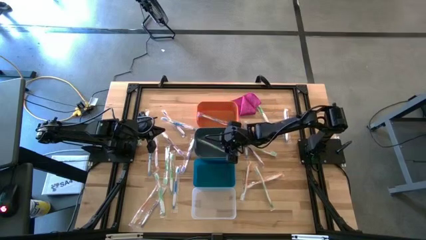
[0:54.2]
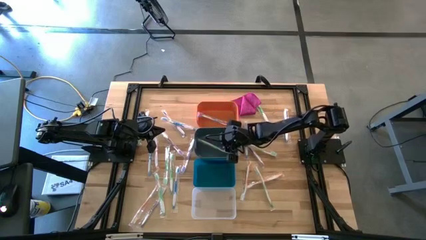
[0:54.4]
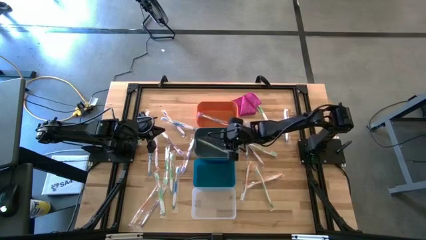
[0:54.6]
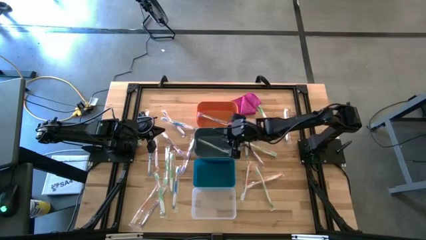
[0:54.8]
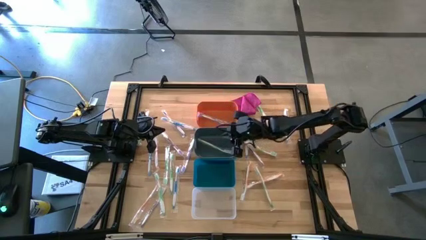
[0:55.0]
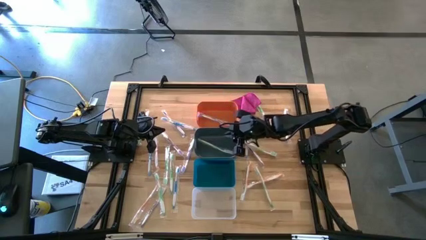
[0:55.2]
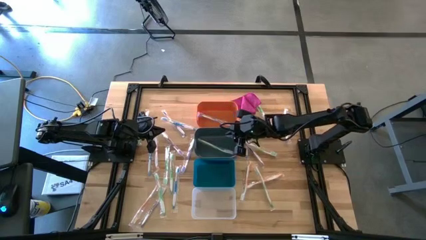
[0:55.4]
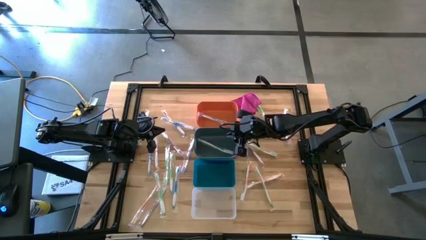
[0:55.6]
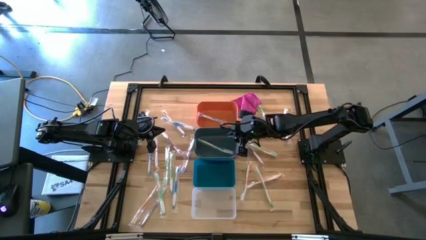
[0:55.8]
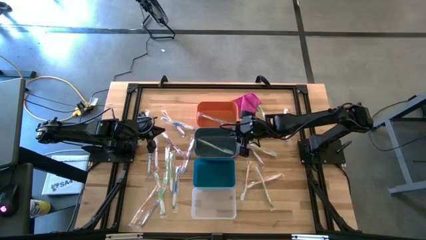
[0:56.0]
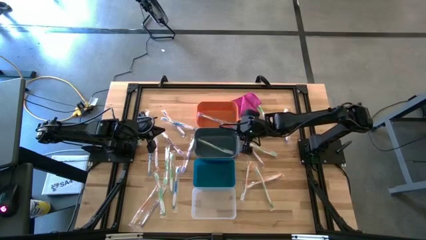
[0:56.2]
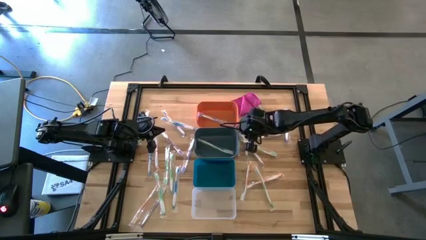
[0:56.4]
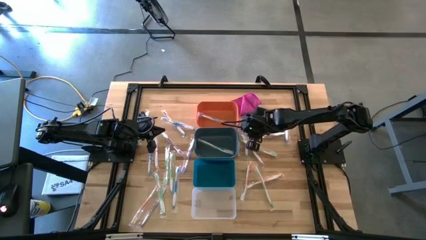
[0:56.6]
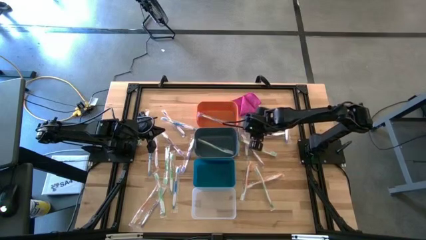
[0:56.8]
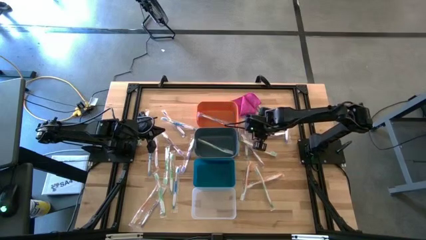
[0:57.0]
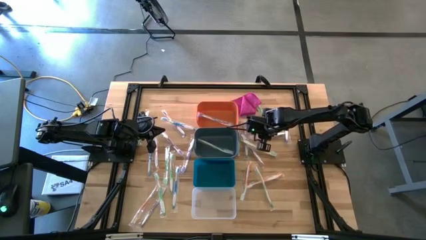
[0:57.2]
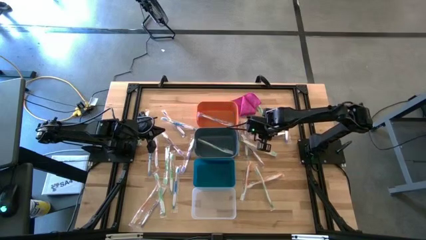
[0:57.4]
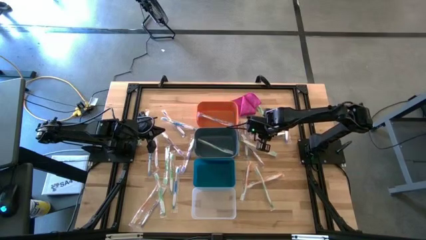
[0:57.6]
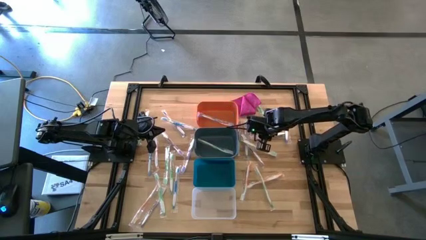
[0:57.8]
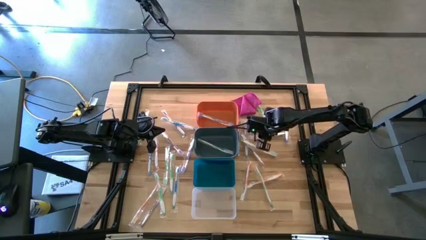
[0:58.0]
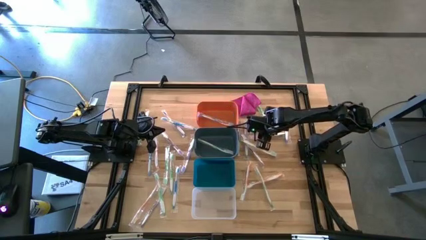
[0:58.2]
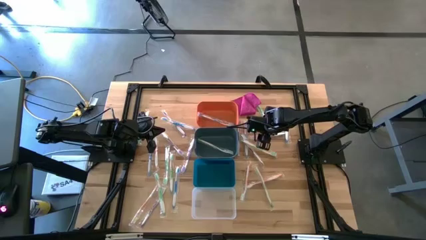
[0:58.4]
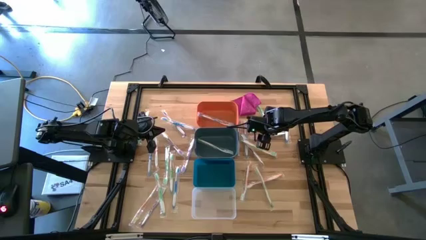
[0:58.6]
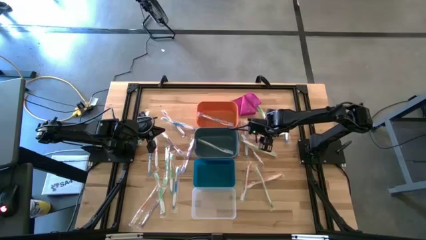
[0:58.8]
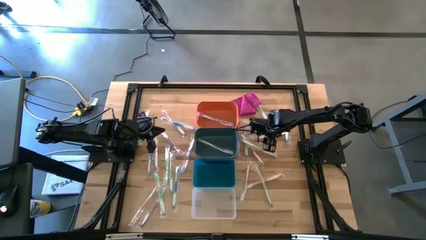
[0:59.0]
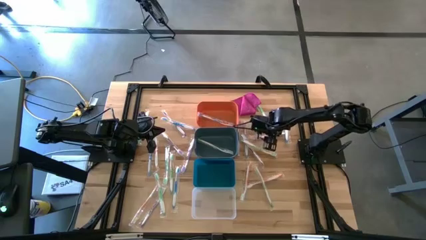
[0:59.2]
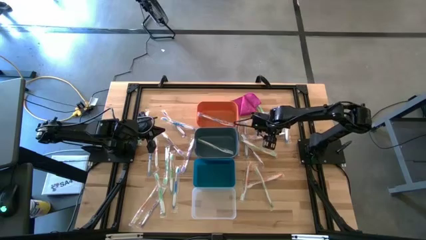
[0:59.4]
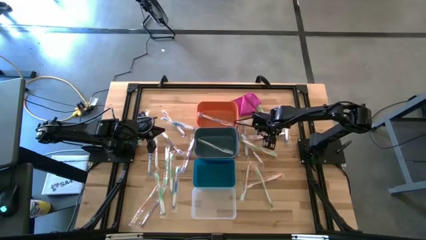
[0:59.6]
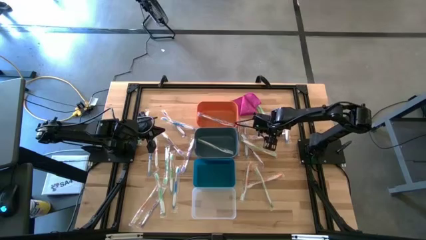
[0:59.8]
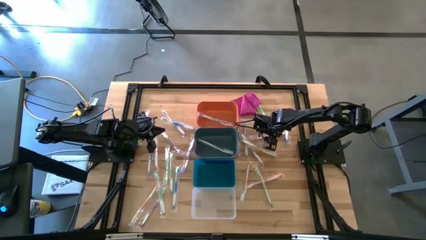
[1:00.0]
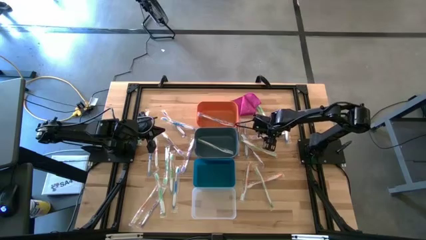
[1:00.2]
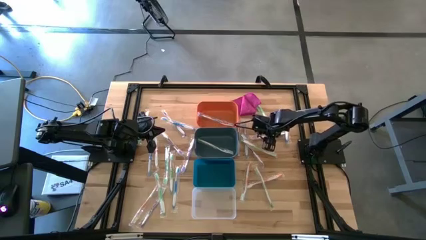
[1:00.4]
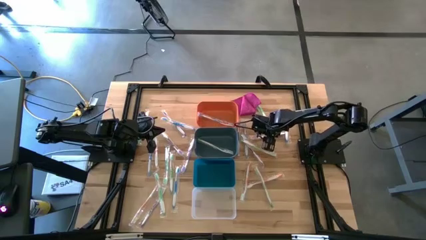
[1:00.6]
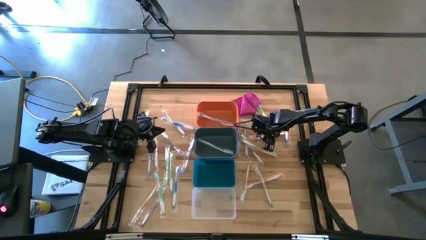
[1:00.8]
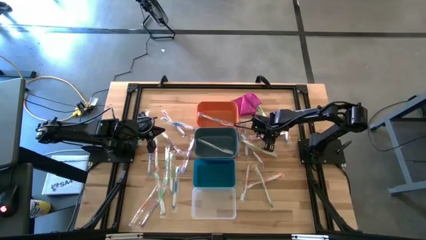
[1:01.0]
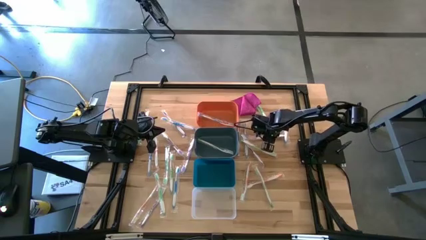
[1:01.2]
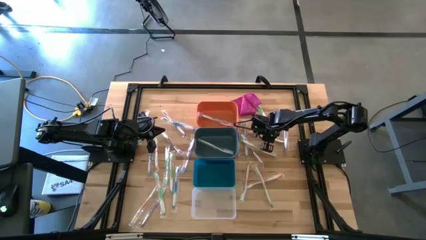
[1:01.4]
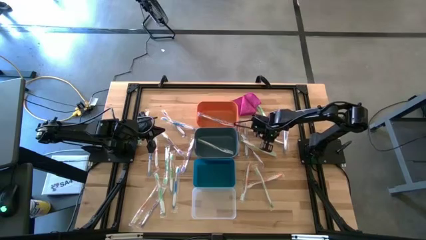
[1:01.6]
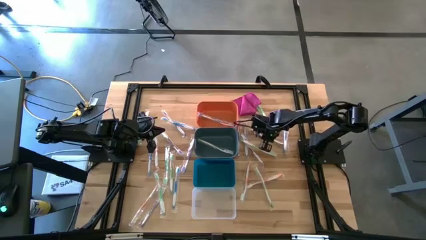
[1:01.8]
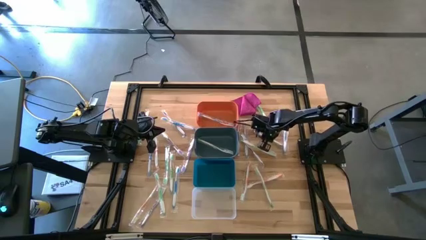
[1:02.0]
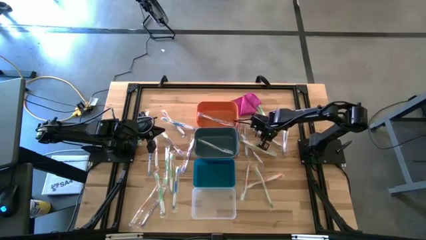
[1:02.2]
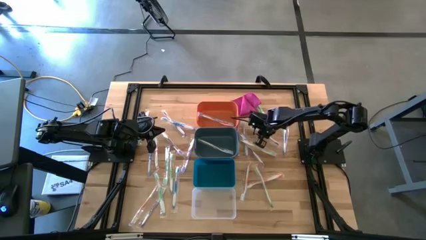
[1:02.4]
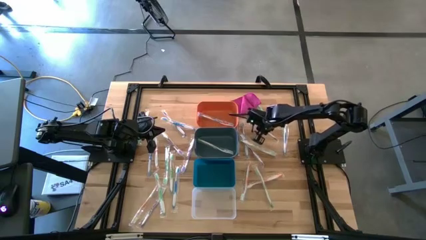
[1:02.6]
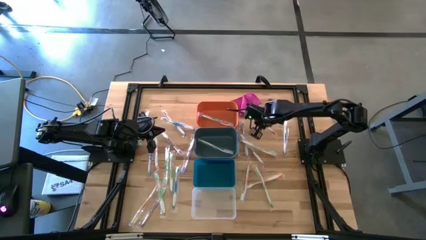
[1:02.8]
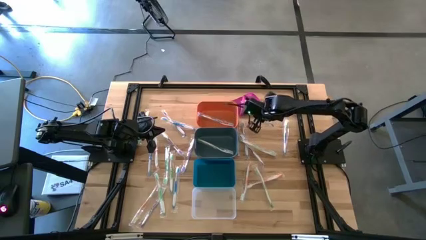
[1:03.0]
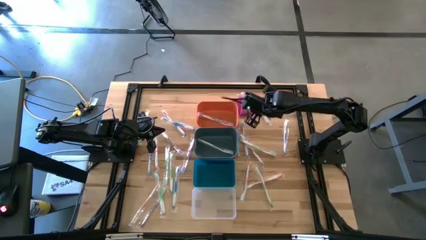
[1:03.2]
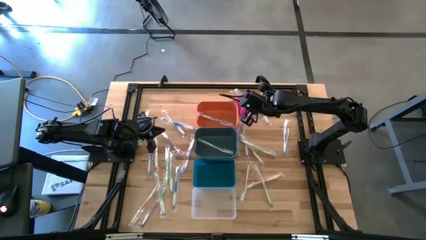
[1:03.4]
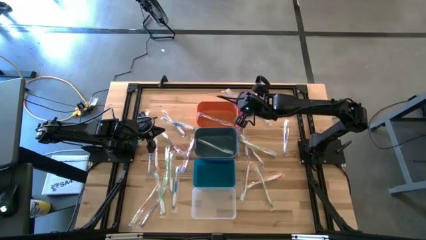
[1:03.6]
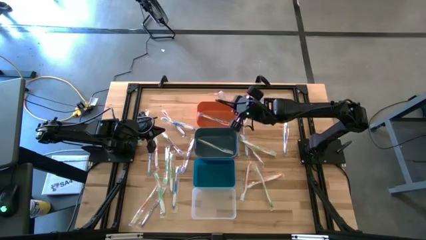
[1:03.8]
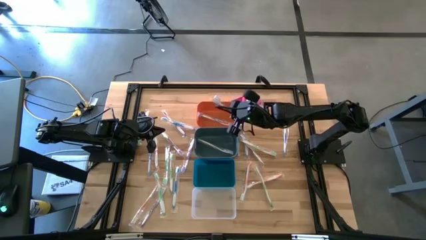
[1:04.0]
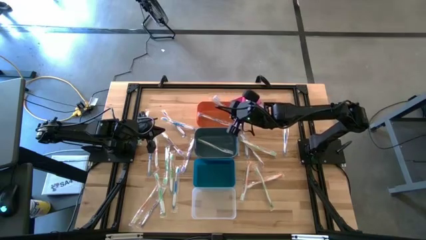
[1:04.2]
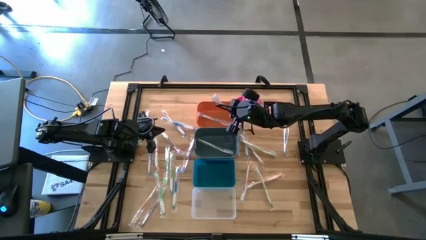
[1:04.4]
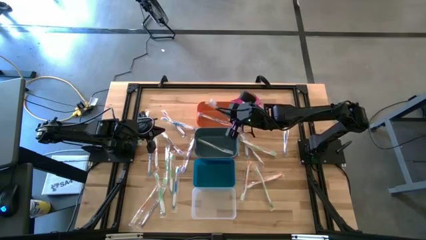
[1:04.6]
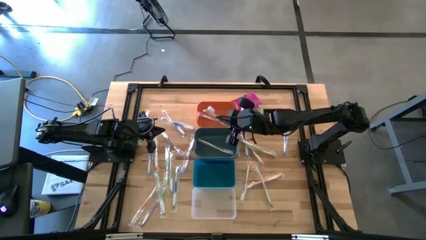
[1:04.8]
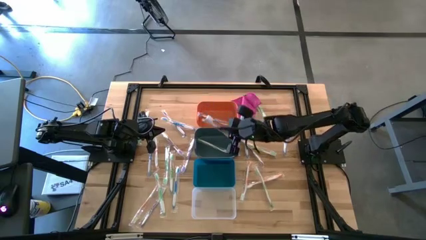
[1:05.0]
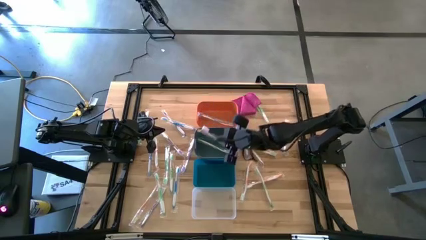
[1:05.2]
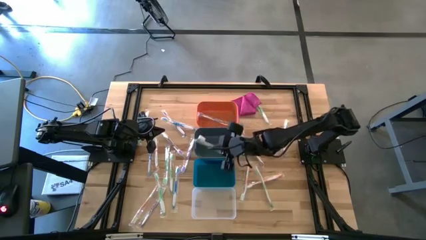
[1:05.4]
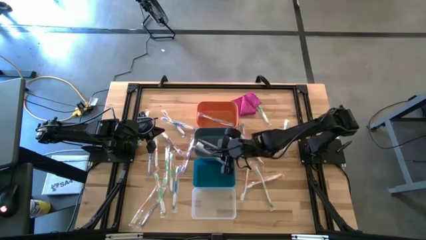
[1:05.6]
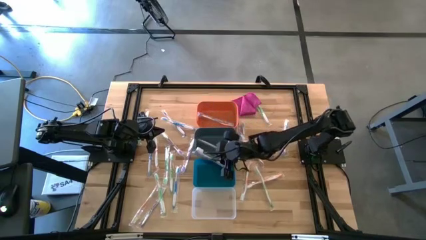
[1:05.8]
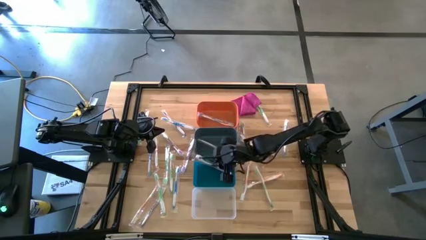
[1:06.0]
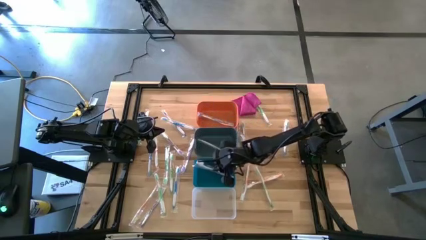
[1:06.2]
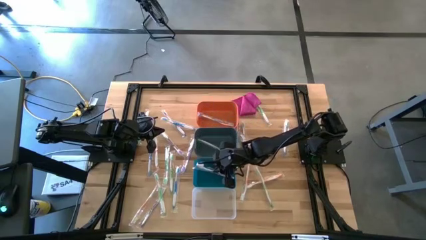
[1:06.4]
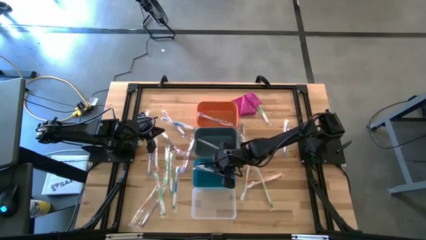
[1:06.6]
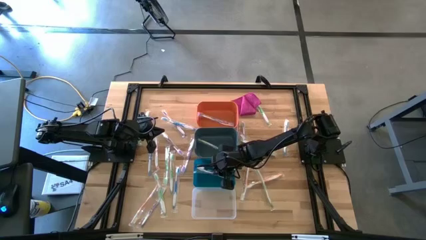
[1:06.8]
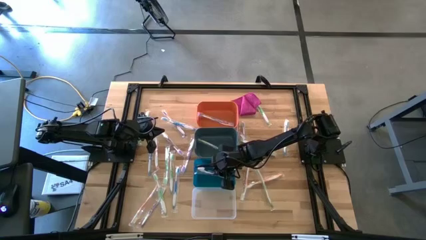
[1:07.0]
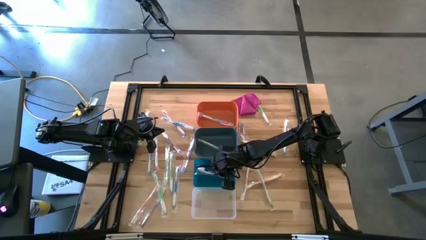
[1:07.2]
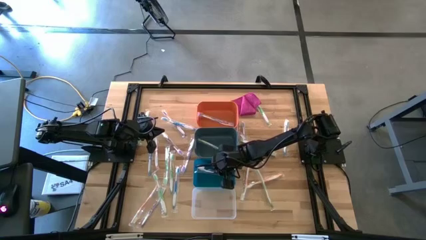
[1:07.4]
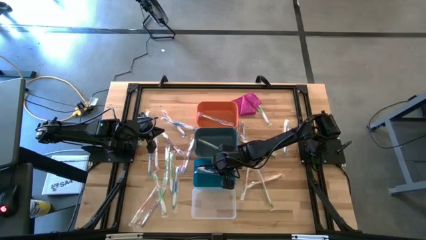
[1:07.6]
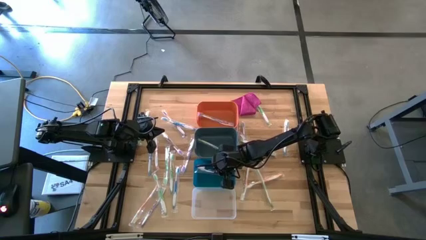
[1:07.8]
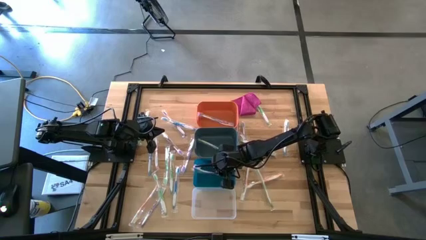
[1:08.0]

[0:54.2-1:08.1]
Task: Pick & Place Toothbrushes
Put the purple toothbrush into the blue bin

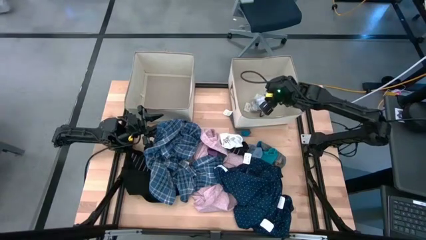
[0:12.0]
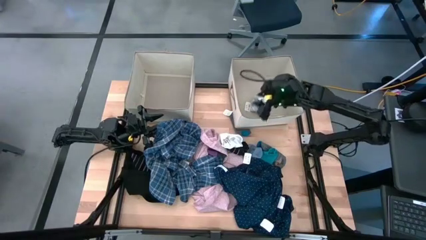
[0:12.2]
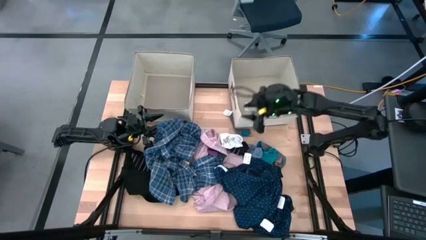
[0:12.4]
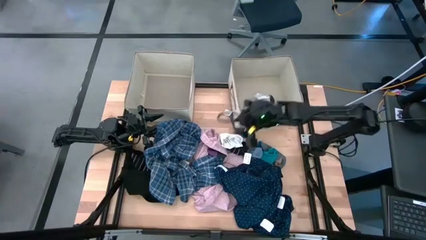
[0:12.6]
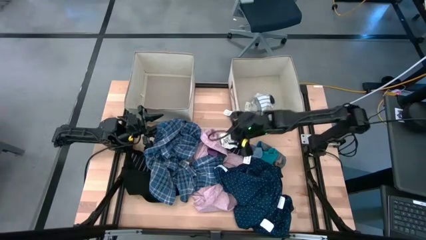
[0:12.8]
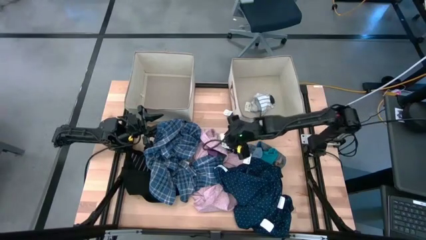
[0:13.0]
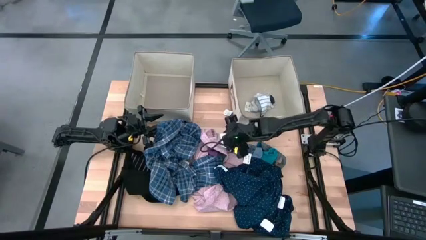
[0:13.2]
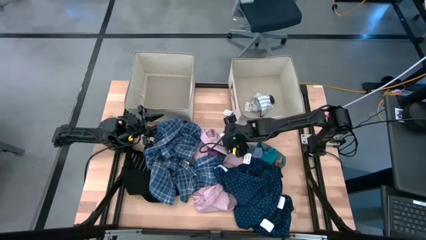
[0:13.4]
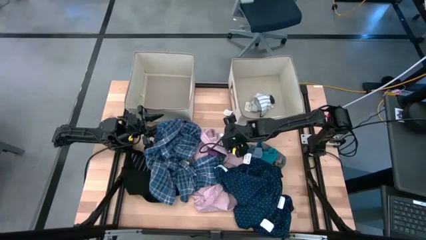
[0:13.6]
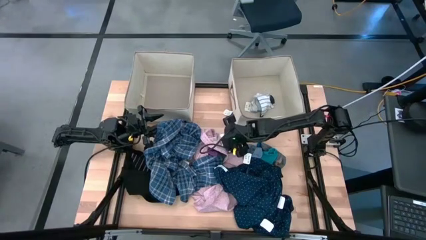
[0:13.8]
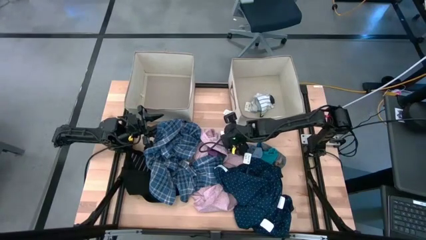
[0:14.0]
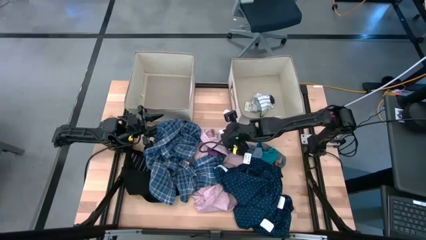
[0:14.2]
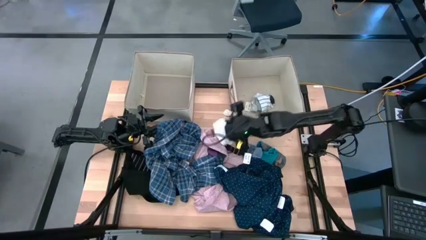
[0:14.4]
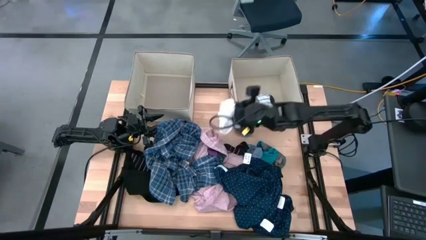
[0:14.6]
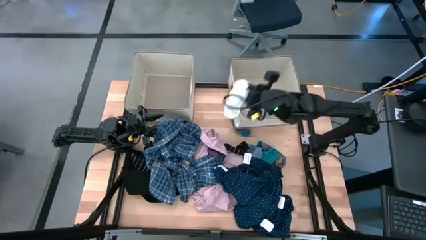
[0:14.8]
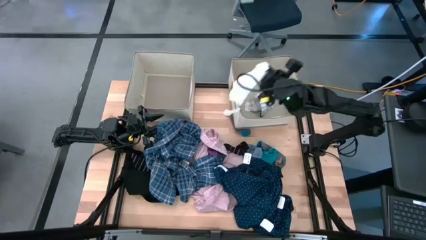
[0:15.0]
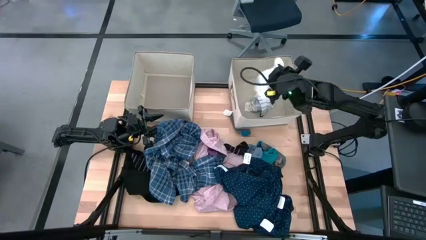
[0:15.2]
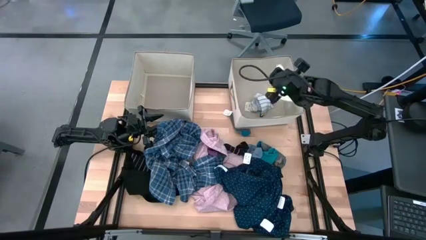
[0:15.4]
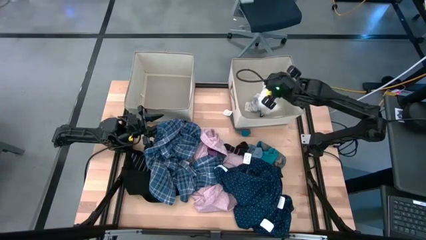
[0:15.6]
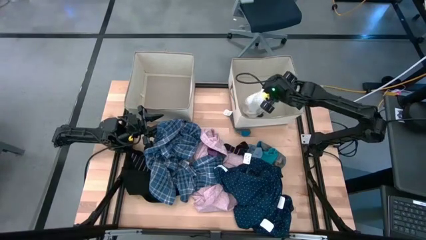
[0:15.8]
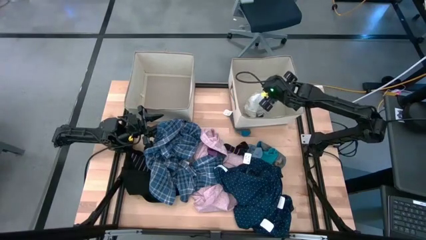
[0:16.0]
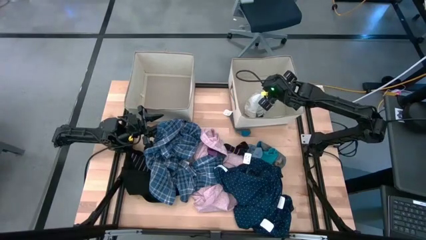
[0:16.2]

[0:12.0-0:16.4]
Task: Sort clothes
Put the white sock into the right brown laundry organizer
